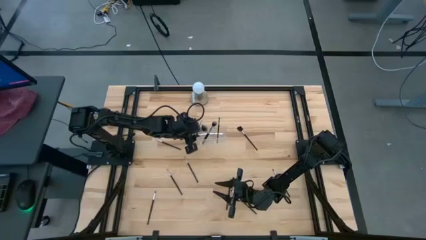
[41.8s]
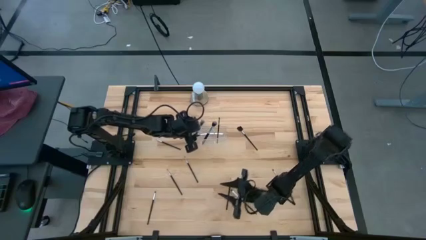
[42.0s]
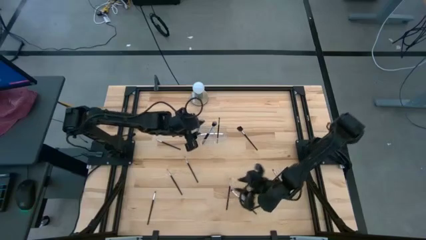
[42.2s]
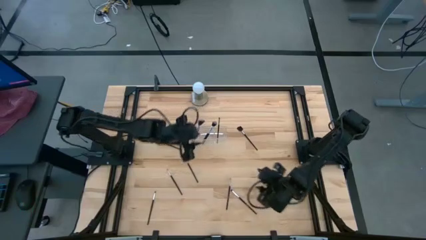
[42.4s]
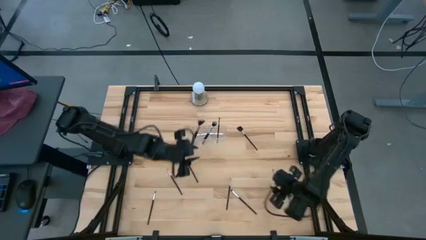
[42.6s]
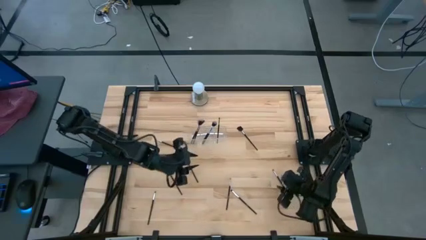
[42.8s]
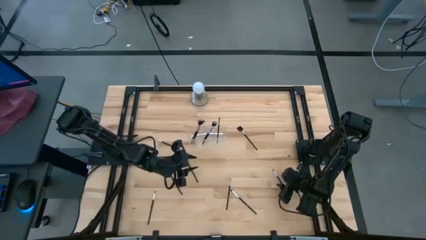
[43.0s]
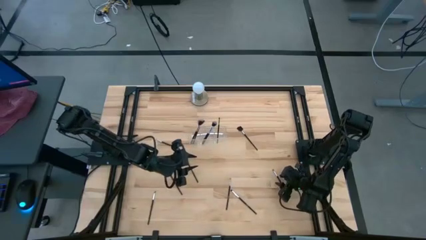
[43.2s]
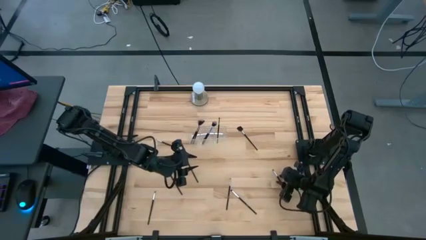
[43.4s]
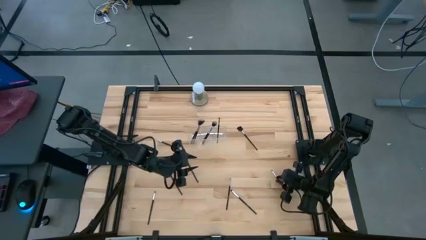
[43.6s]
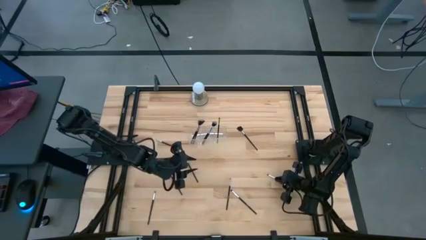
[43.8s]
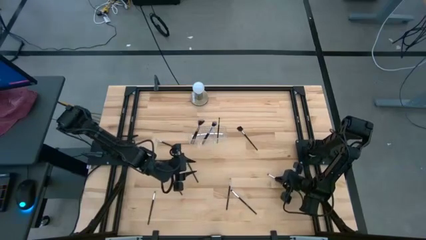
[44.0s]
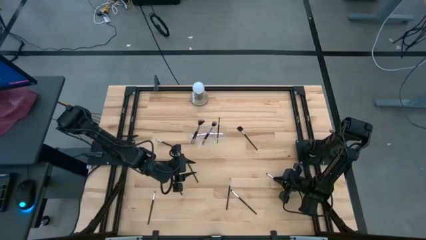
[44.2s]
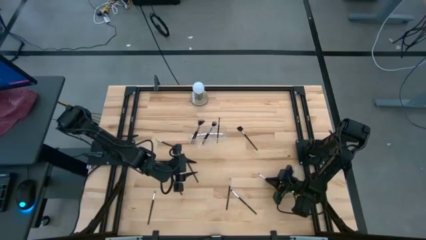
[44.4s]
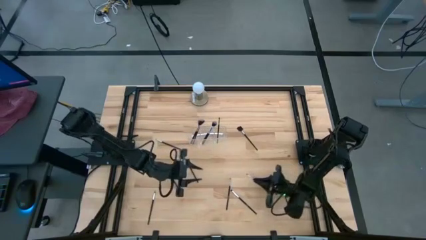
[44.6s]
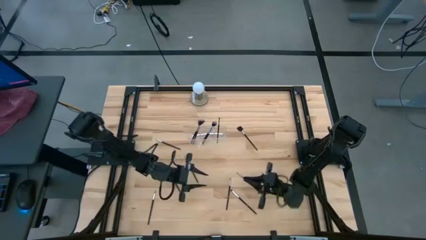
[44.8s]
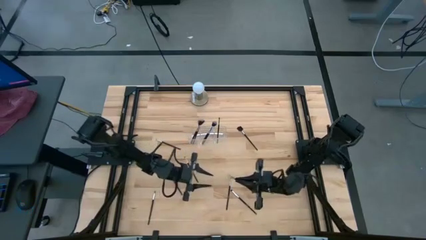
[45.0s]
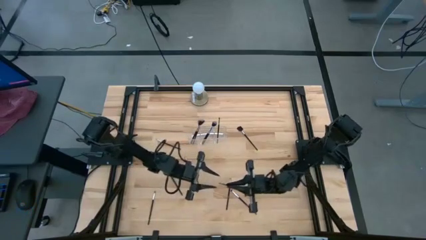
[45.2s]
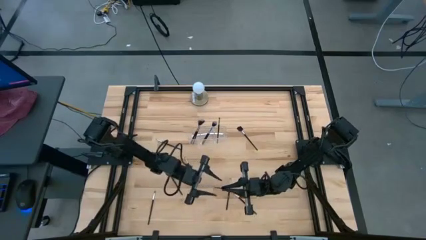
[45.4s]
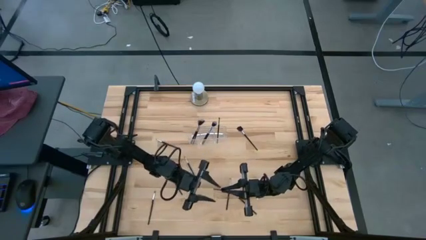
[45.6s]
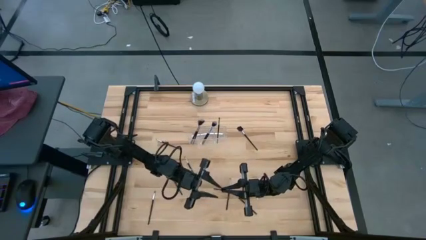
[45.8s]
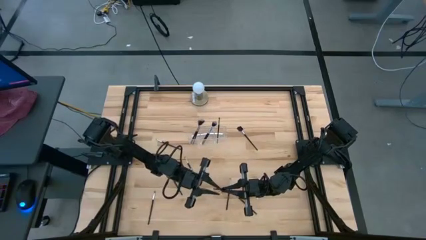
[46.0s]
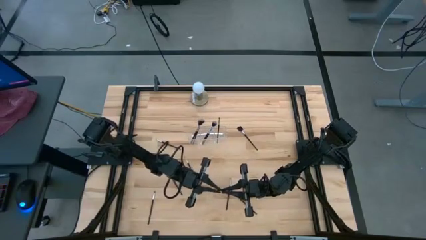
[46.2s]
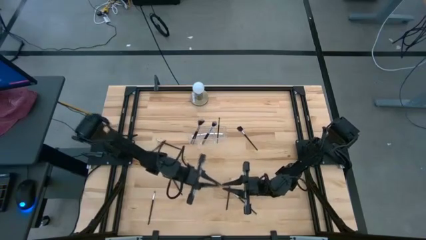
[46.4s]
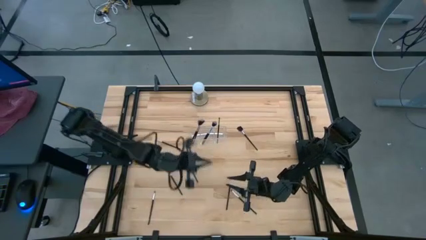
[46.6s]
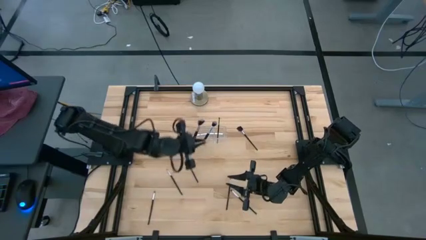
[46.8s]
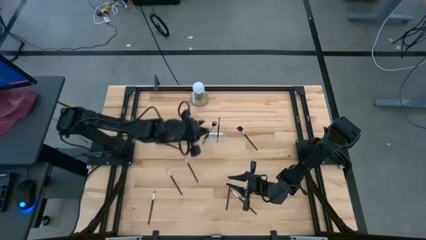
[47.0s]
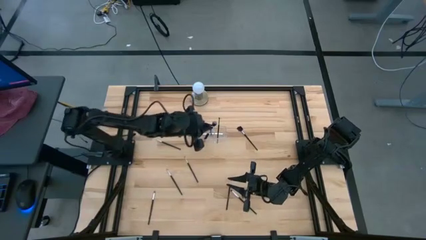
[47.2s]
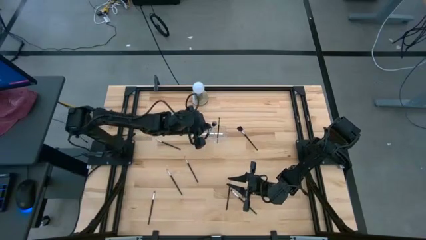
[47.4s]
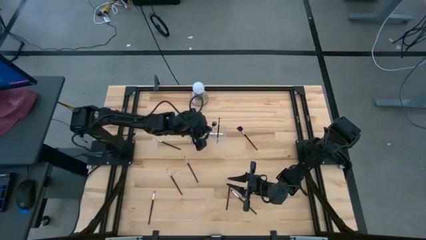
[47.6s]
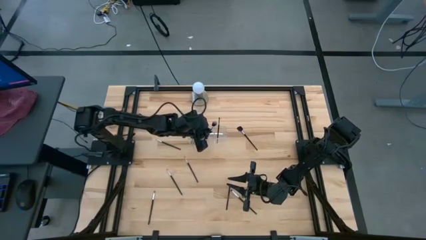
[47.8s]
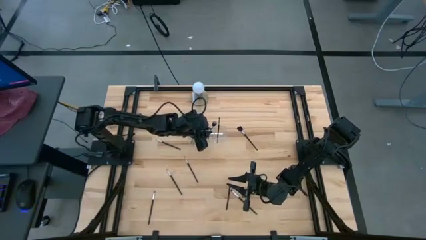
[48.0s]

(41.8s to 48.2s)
Task: Put items in baskets/containers
Put the eyeshadow brush into the transparent organizer

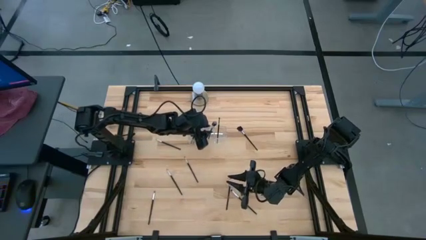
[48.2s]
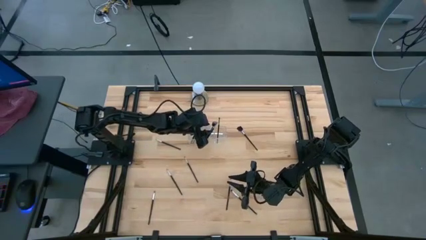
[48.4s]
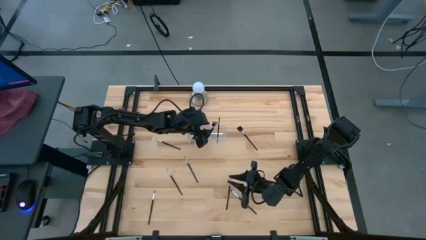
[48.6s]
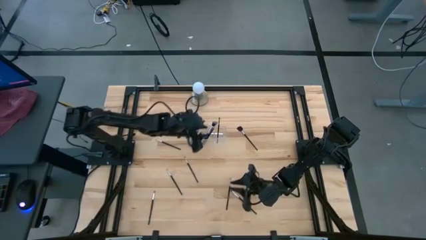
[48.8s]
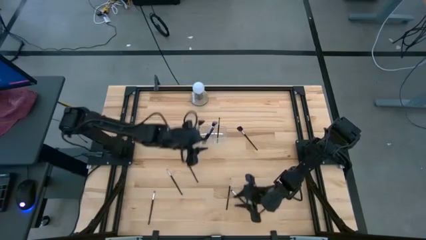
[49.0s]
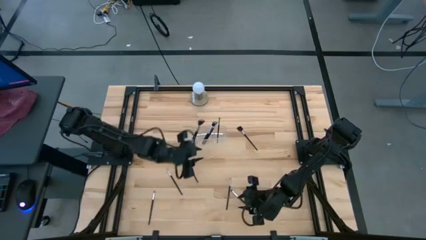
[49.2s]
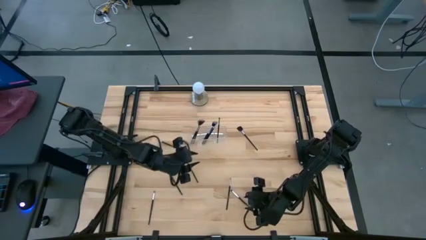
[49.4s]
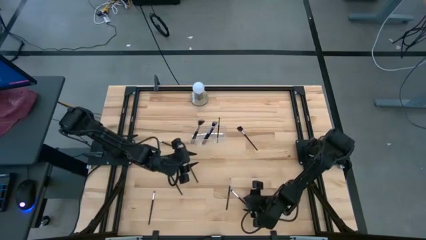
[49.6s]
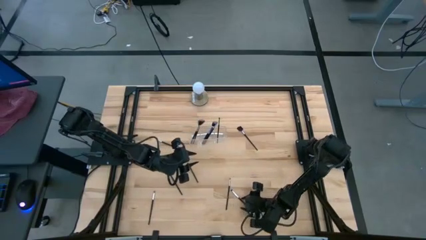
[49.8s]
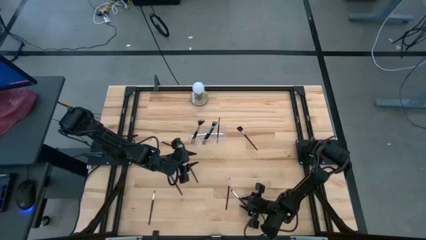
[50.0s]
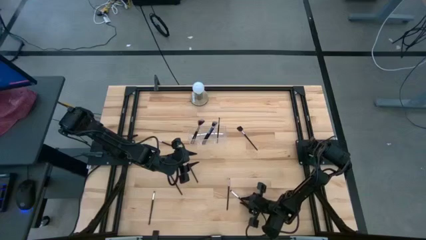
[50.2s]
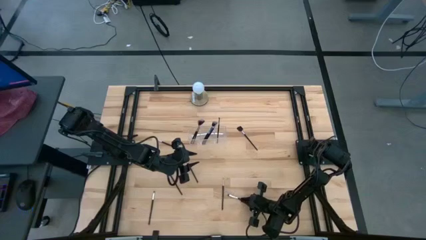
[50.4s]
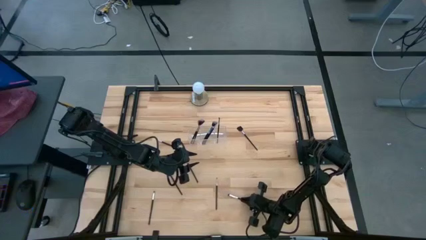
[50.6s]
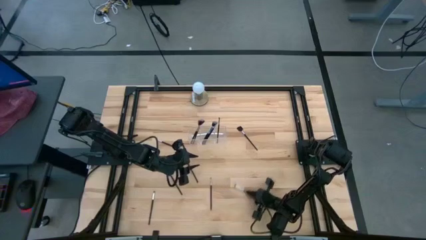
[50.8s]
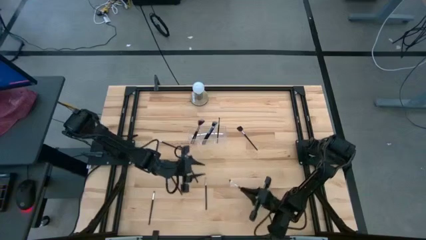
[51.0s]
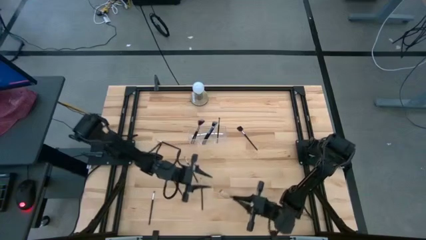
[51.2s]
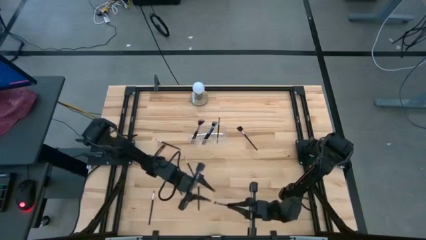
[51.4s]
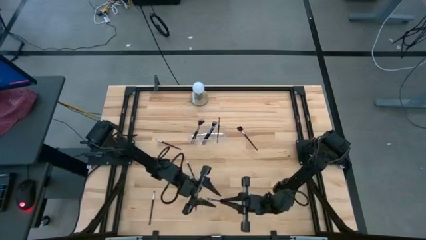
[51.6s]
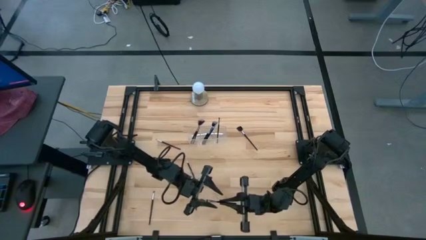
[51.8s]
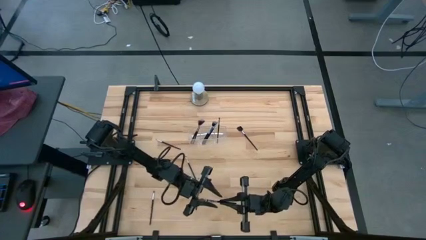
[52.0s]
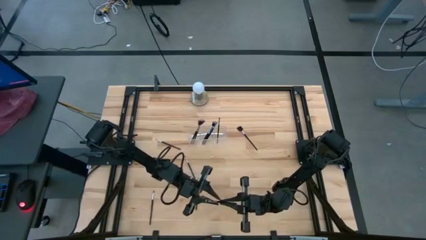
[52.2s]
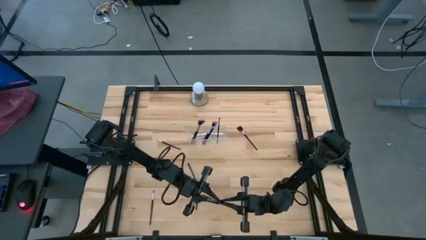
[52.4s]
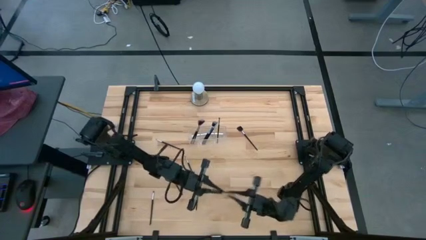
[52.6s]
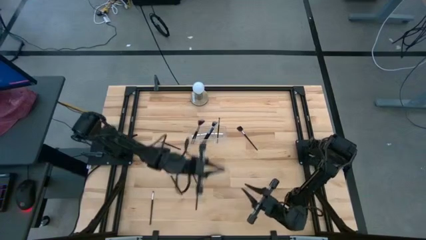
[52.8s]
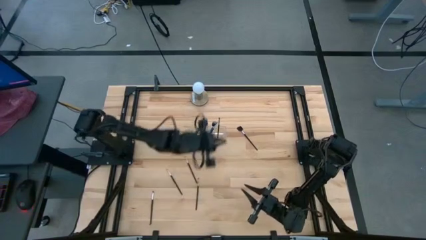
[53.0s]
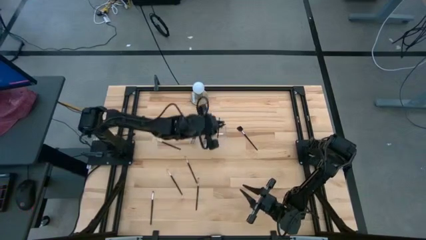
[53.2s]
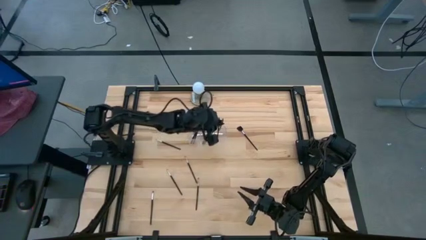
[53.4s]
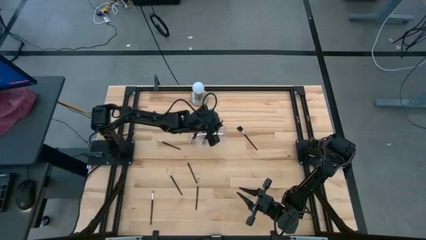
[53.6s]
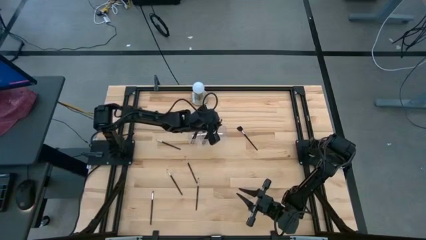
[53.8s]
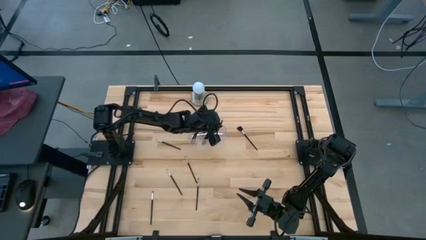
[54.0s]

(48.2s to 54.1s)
Put the eyeshadow brush into the transparent organizer

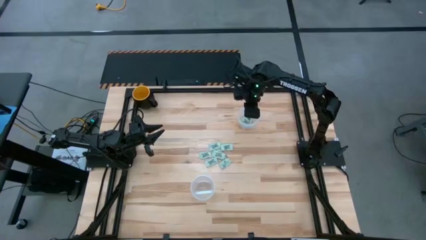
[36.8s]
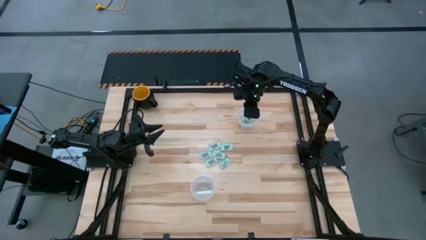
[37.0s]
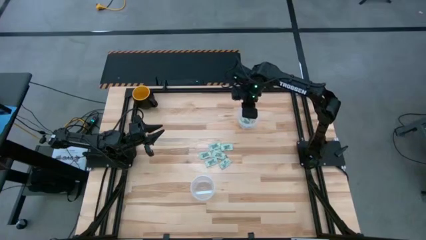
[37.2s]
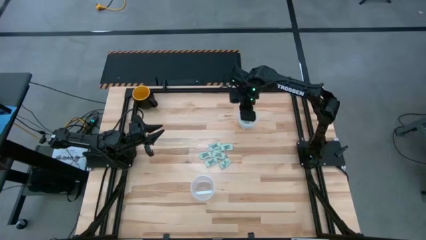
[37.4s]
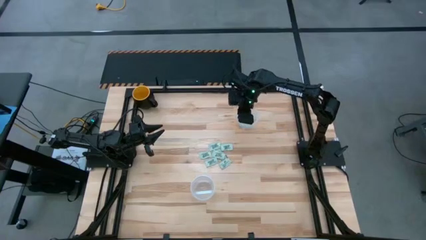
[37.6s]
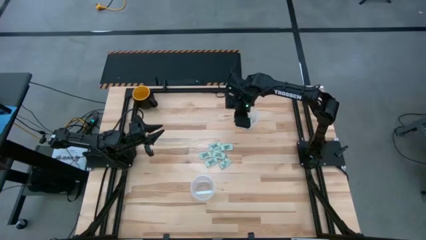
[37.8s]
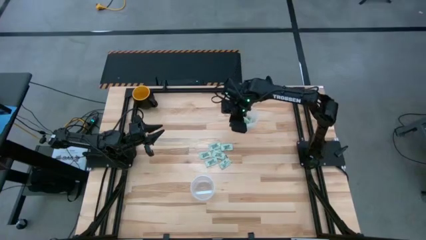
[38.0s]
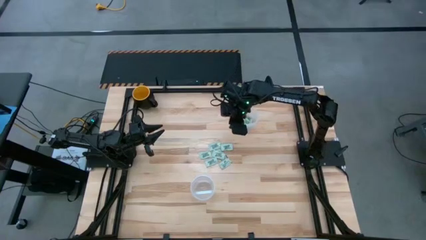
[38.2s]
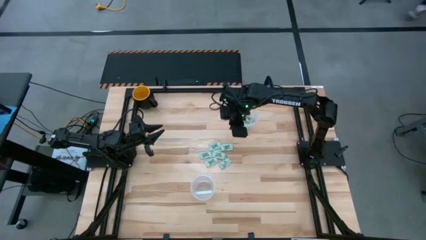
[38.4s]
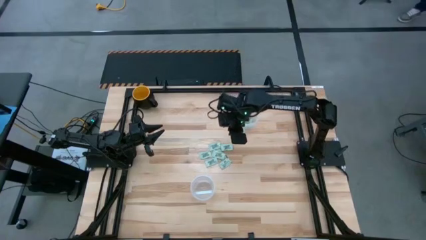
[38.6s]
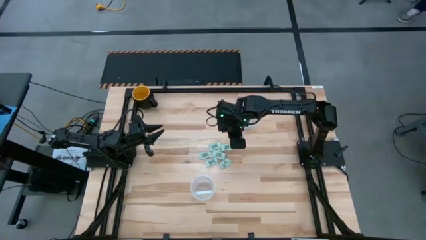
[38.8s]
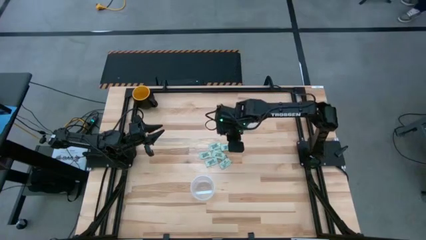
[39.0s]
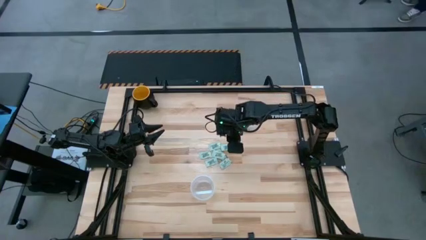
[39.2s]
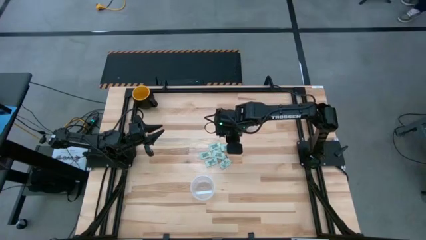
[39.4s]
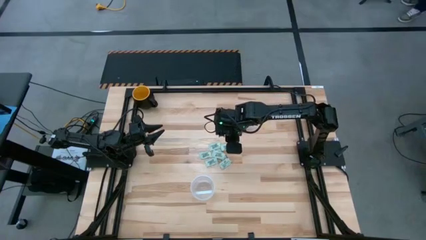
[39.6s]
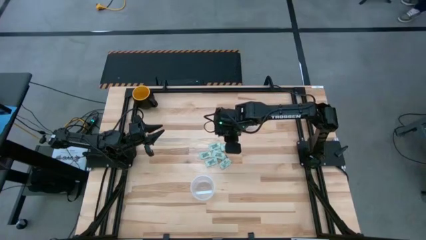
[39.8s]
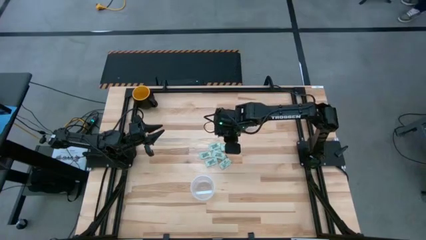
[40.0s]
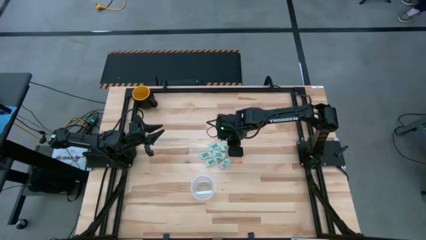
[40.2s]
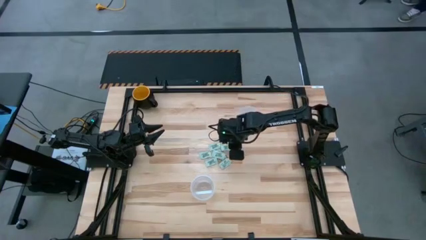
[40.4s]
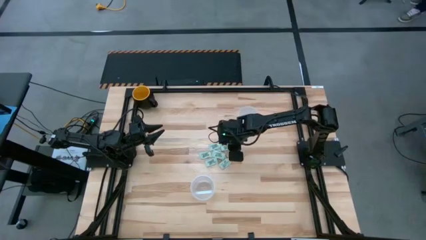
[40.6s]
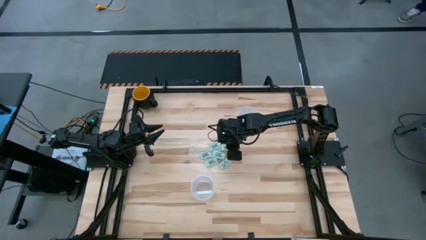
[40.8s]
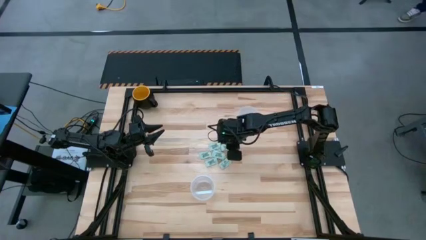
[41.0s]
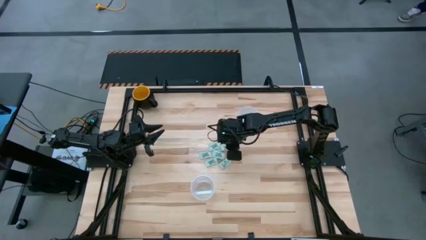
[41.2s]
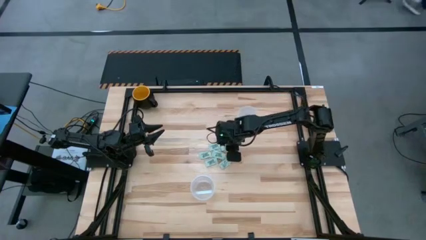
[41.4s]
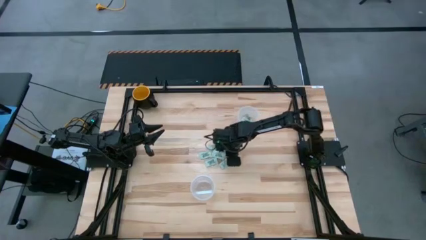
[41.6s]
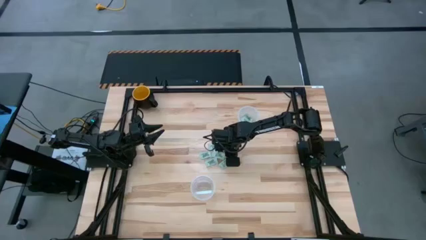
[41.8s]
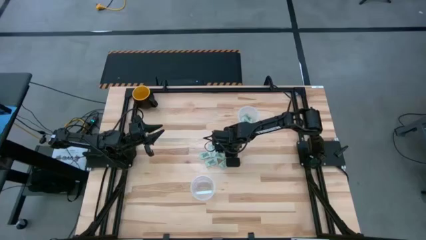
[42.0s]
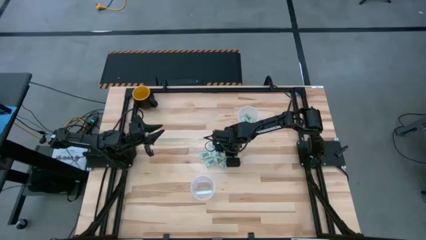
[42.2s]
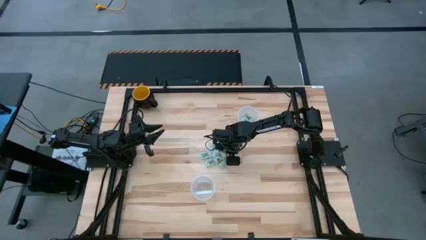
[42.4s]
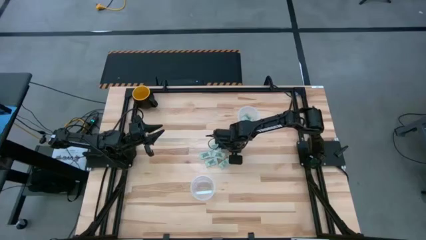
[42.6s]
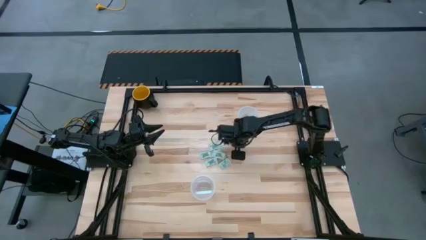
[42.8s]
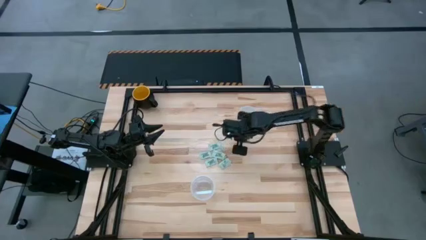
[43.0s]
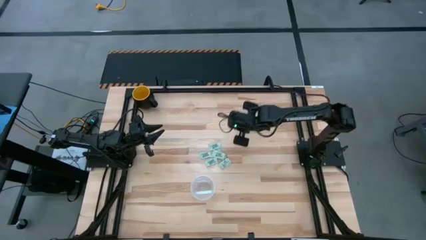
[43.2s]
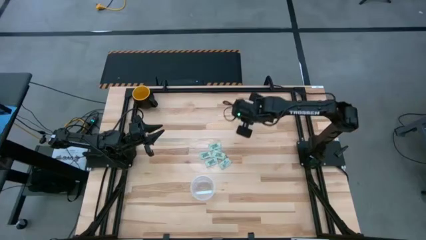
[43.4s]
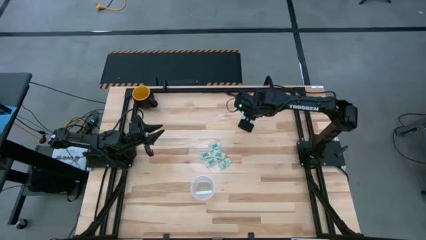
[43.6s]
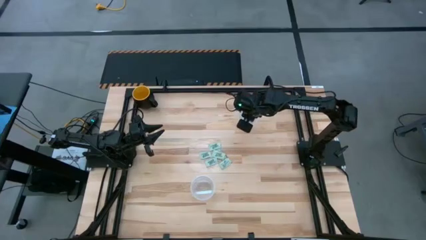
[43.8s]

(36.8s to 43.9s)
Task: Pick and place Stevia / Truvia into bins
Put the stevia packet into the top transparent container
